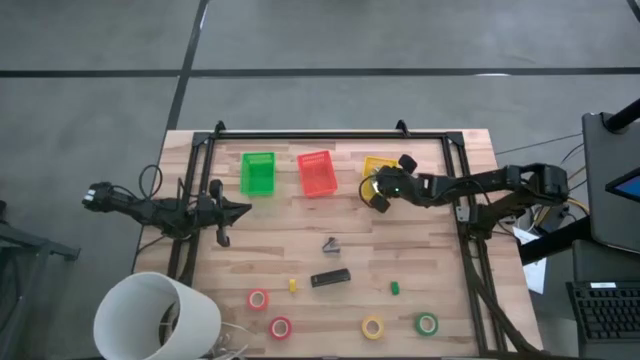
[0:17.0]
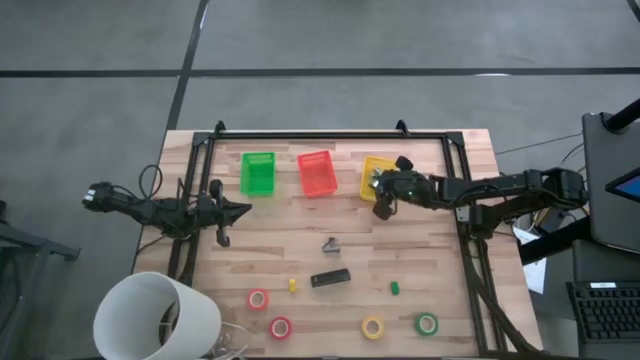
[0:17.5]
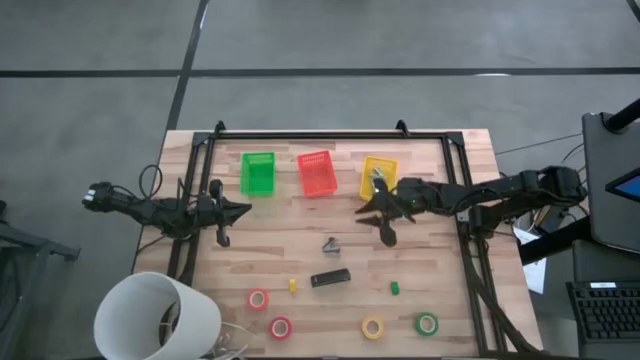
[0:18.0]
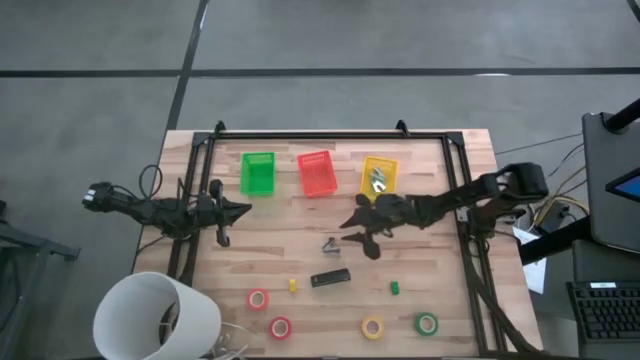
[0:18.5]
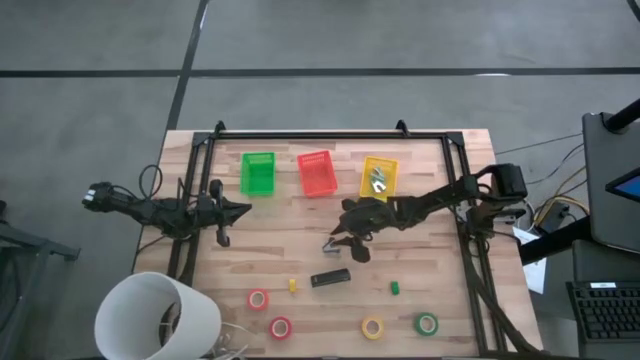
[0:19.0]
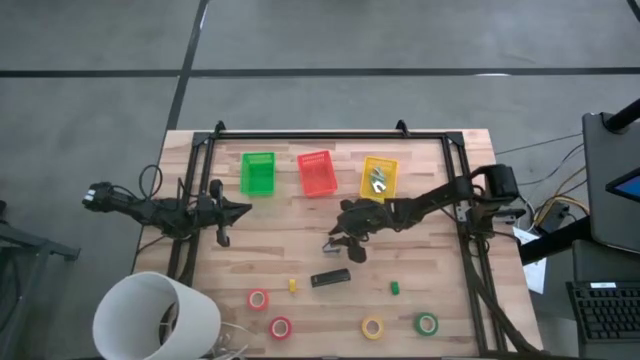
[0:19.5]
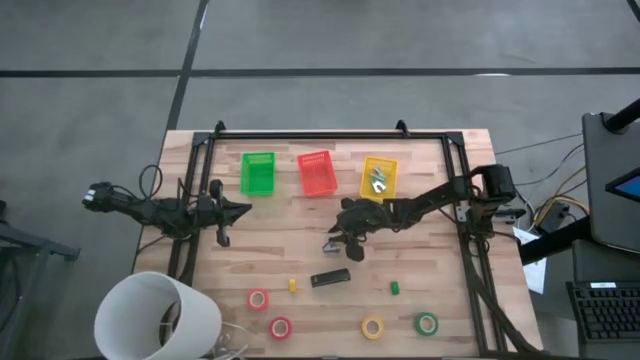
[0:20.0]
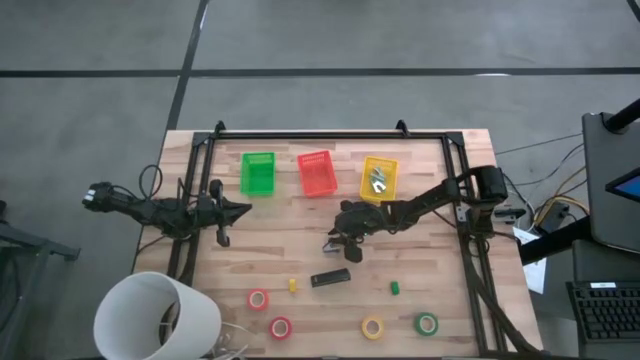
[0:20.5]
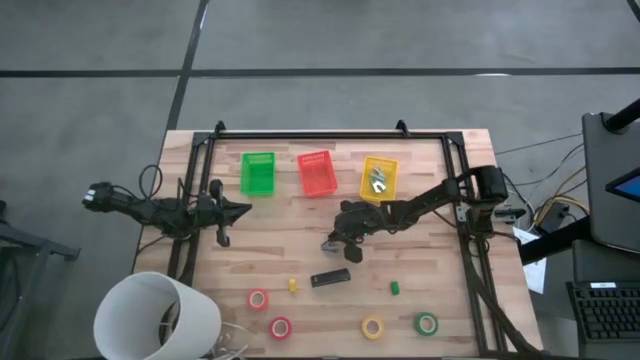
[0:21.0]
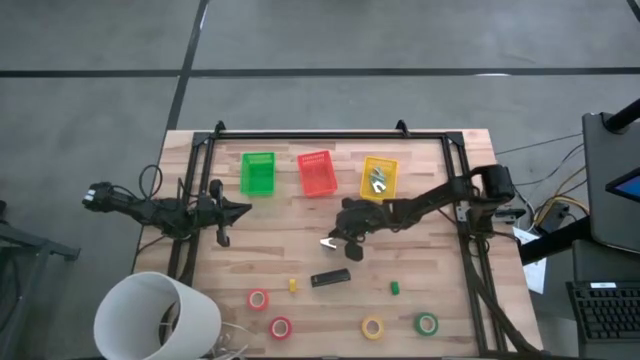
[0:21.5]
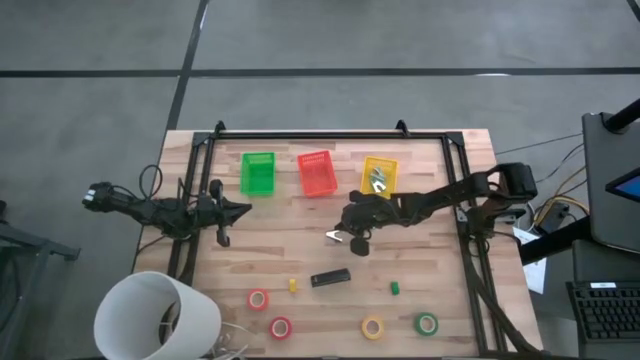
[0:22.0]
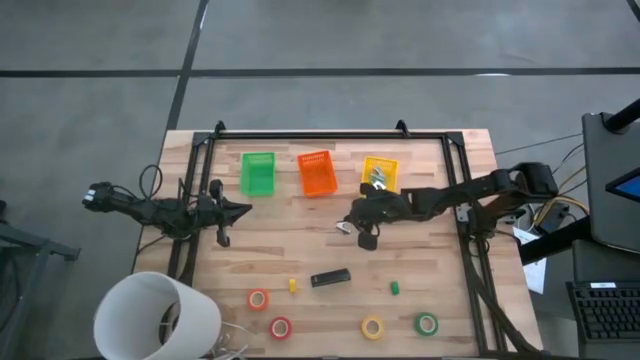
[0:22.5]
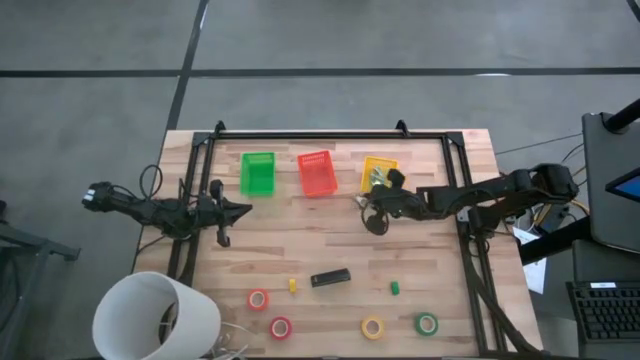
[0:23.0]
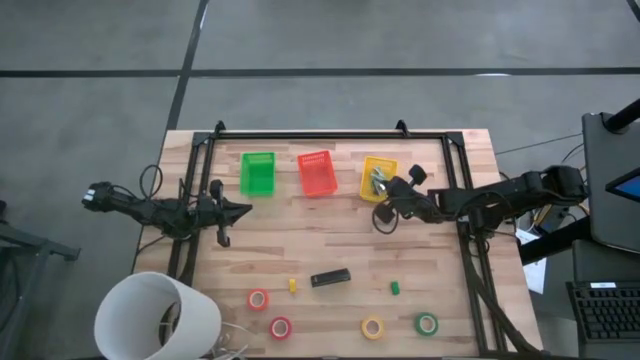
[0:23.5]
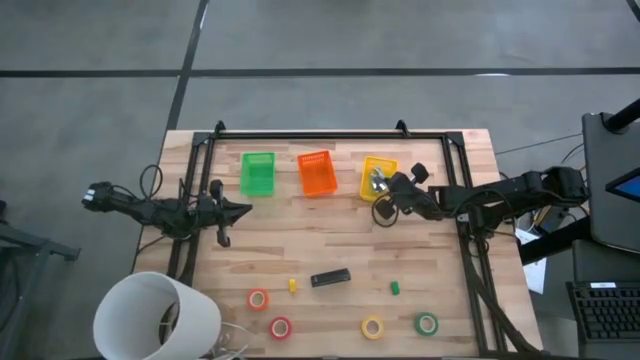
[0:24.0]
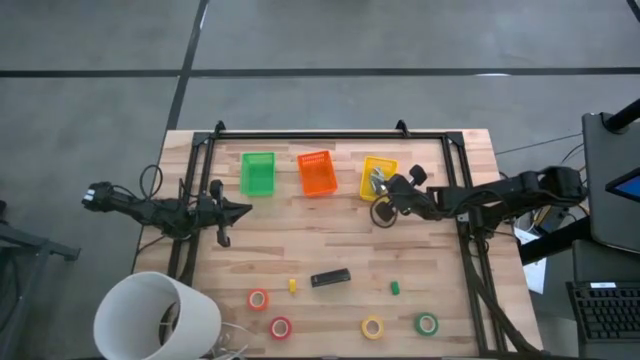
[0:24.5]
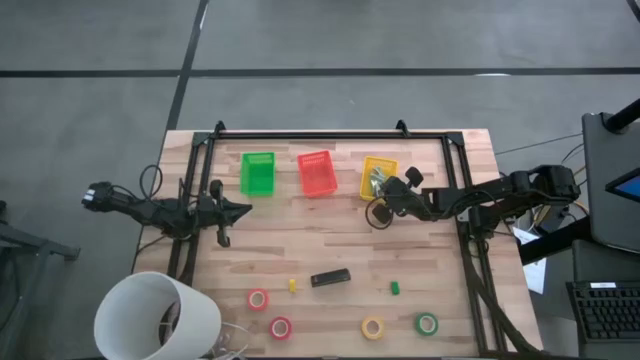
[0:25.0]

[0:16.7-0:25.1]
Task: Pick and place Stapler, Stapler remover, tape
Put the black staple remover into the yellow bin

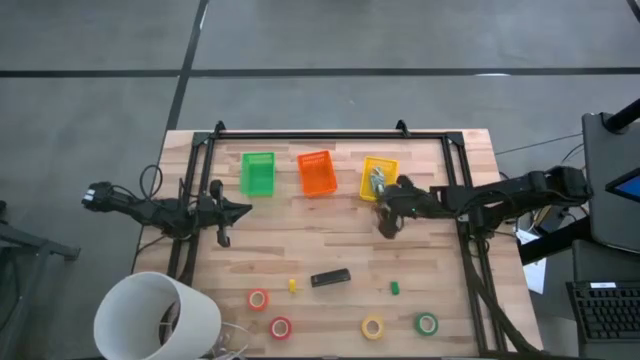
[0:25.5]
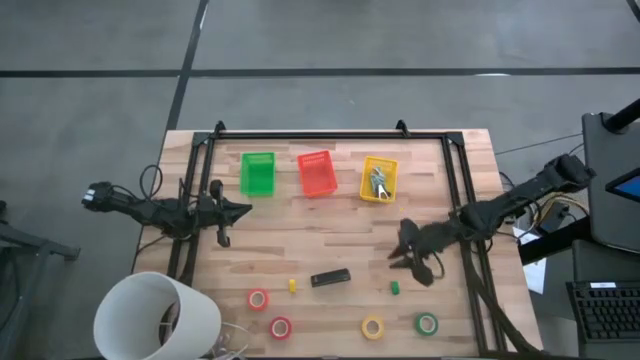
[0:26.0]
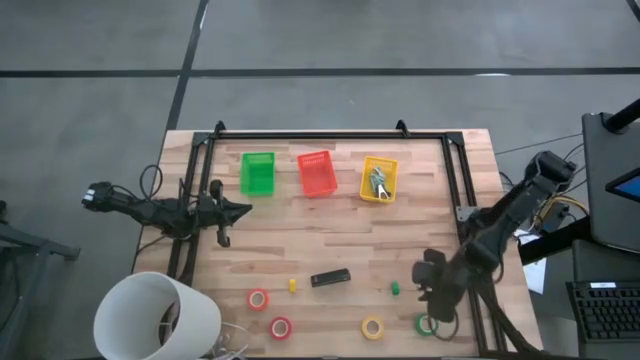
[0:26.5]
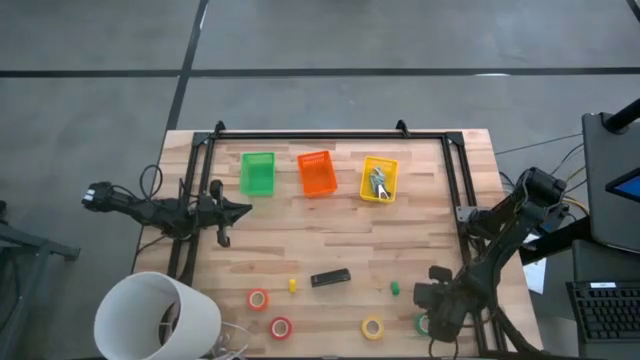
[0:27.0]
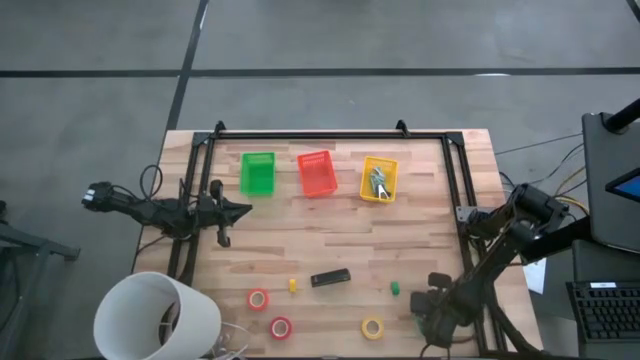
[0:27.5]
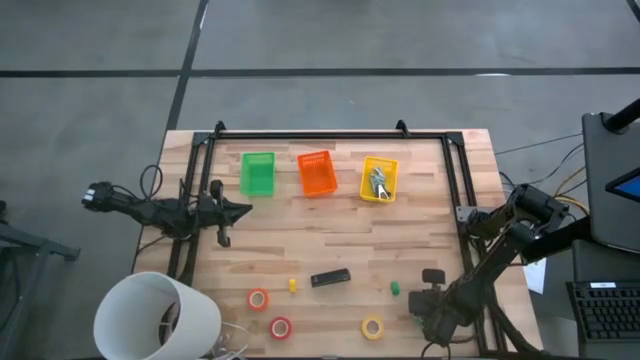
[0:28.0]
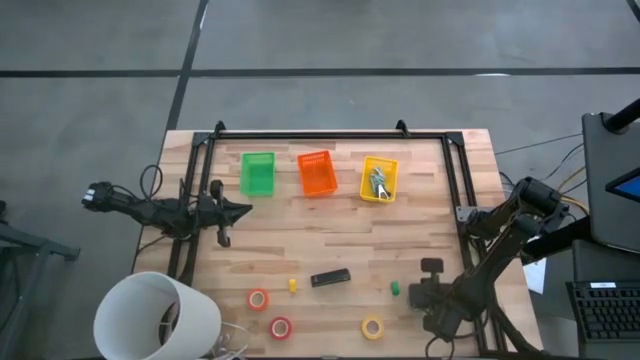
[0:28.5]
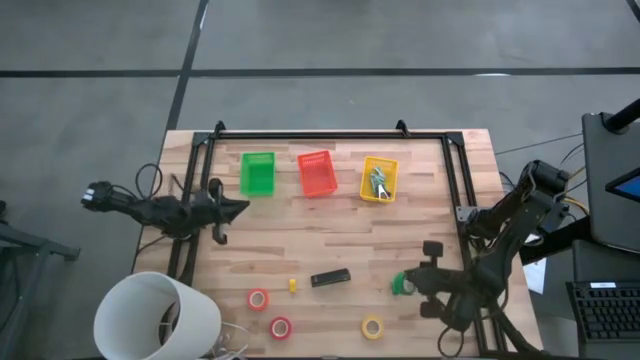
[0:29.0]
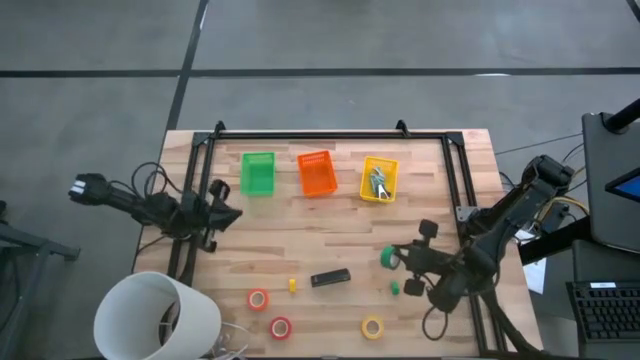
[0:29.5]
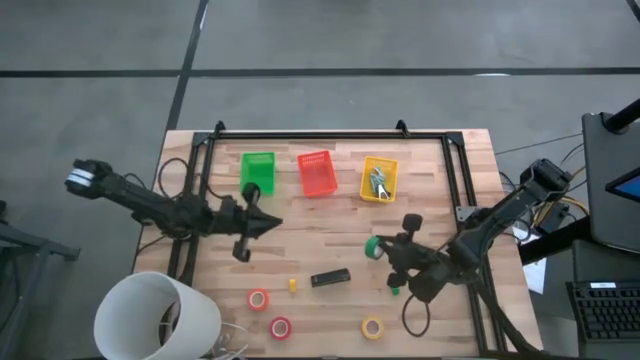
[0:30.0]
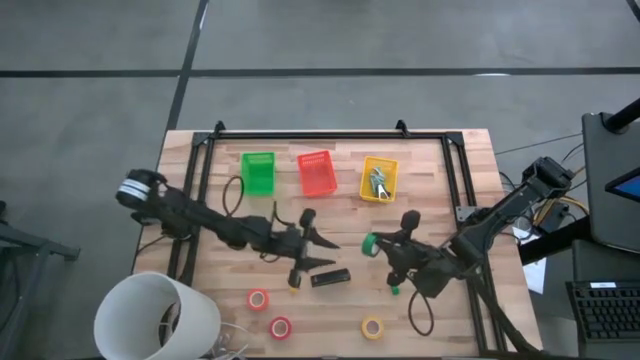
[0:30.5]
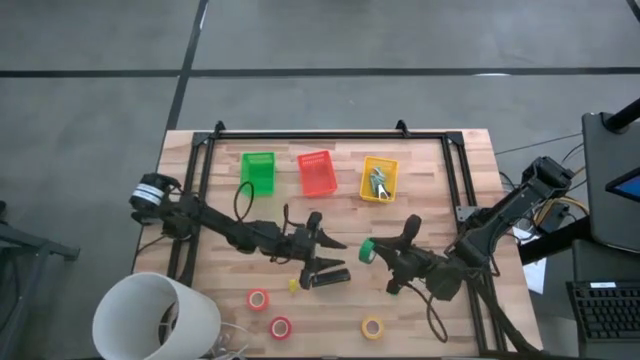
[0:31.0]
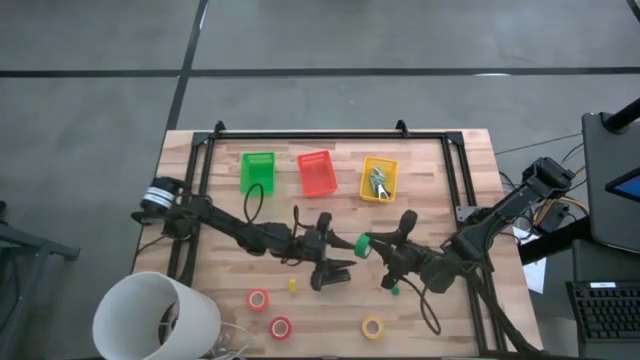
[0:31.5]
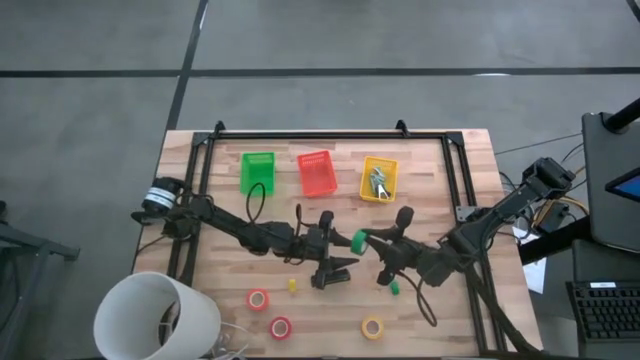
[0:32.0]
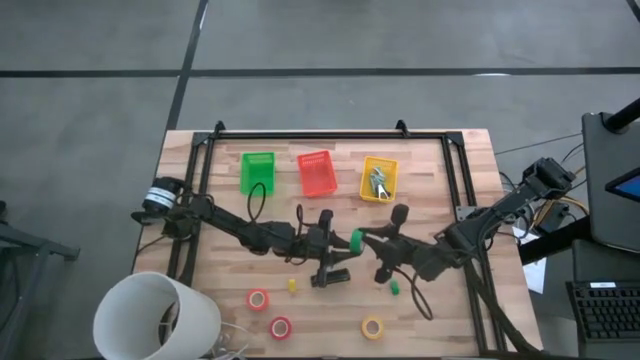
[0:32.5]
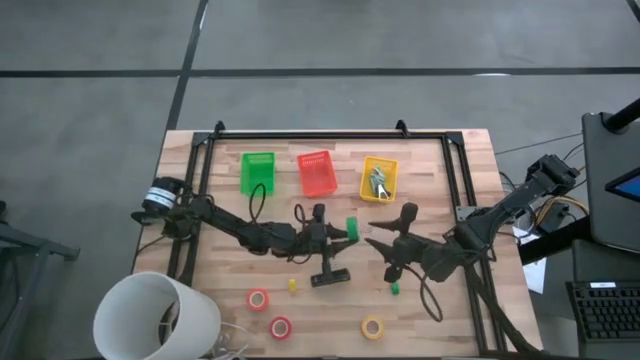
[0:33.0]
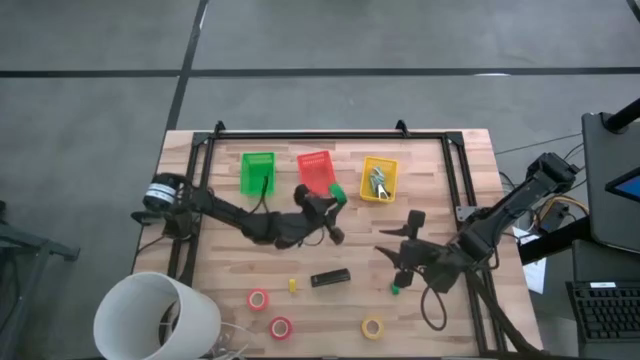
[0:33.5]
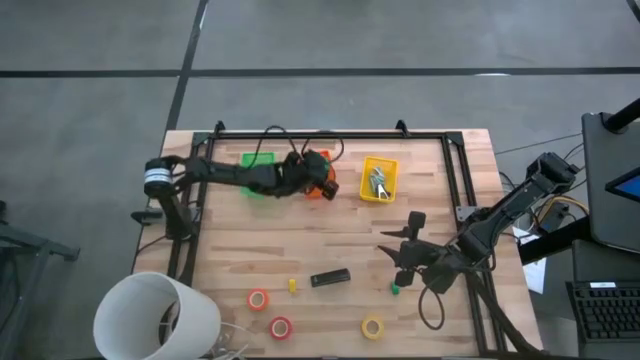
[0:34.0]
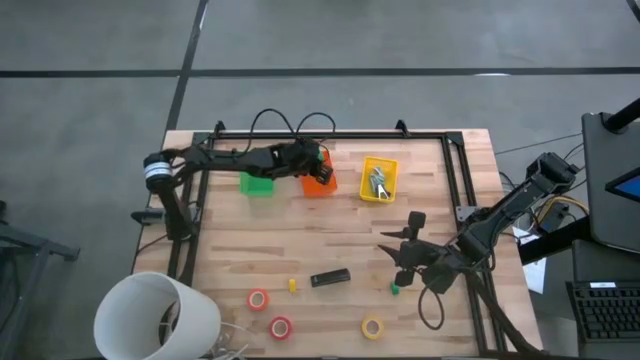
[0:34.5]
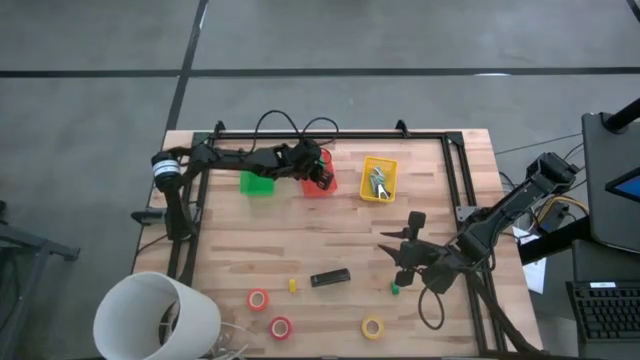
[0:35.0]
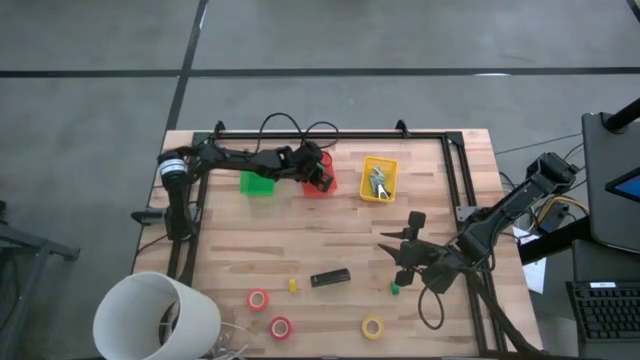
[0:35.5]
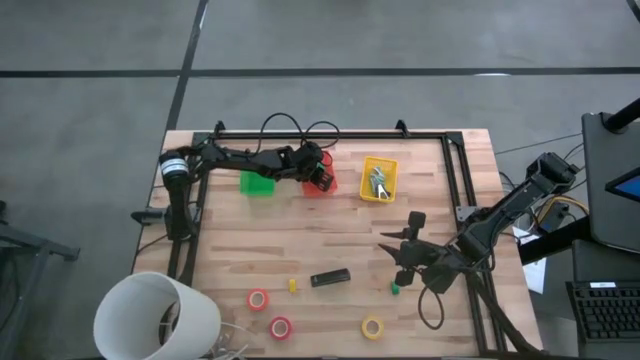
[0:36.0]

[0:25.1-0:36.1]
Put the green tape into the orange bin
